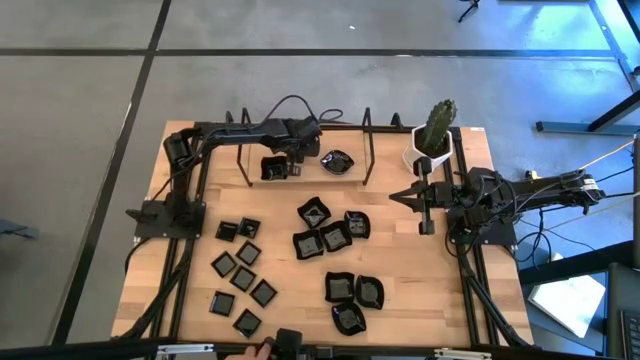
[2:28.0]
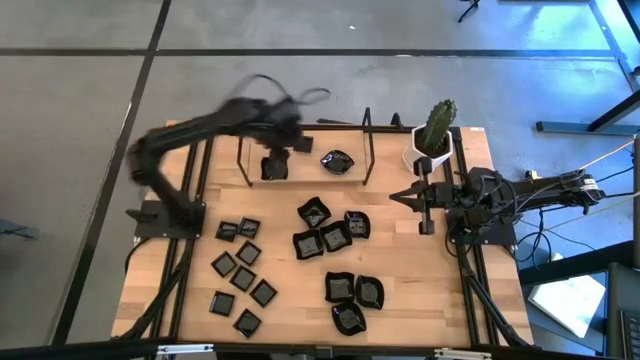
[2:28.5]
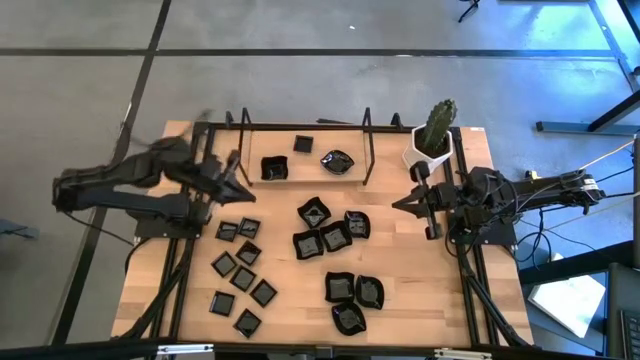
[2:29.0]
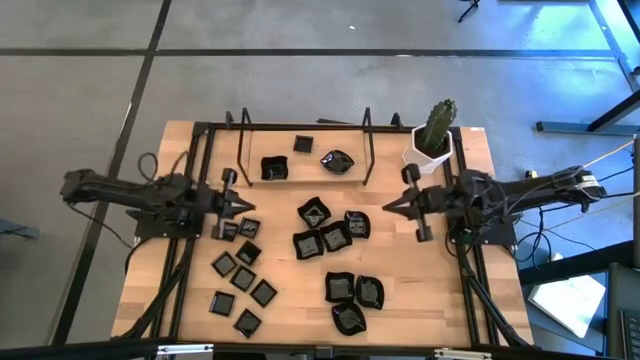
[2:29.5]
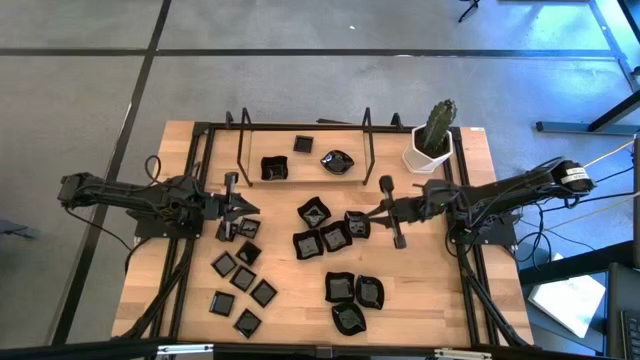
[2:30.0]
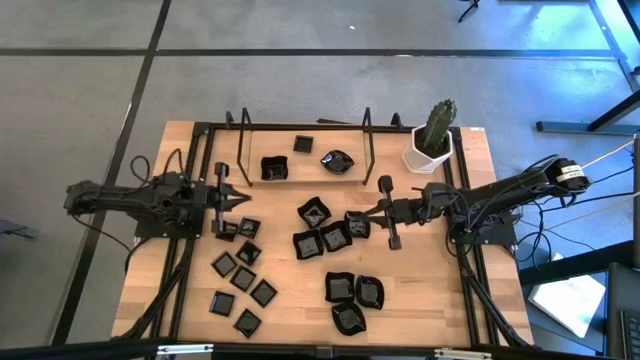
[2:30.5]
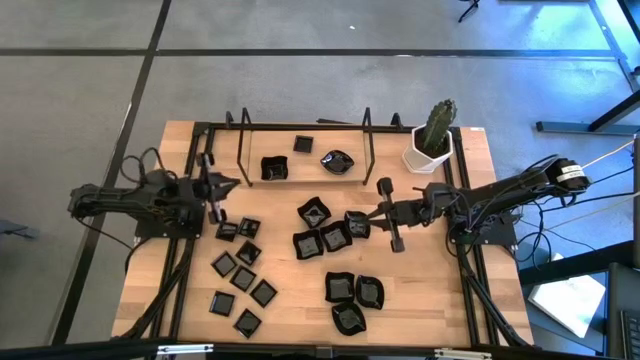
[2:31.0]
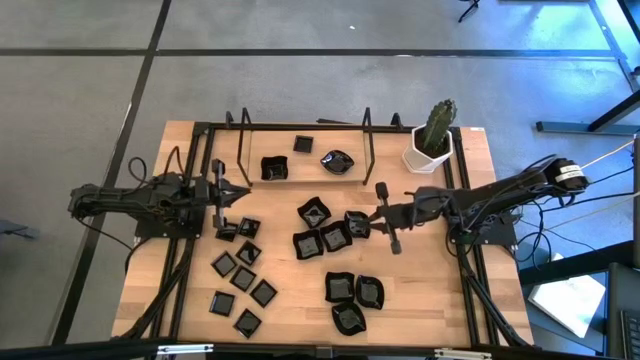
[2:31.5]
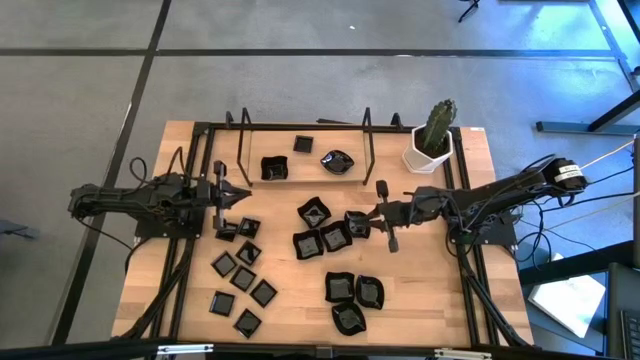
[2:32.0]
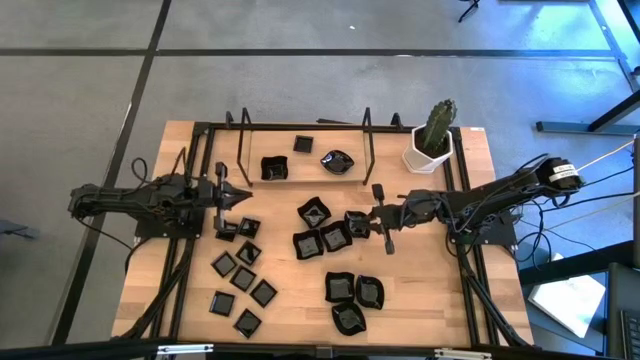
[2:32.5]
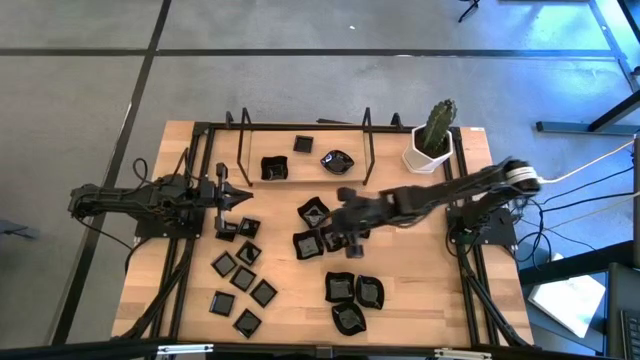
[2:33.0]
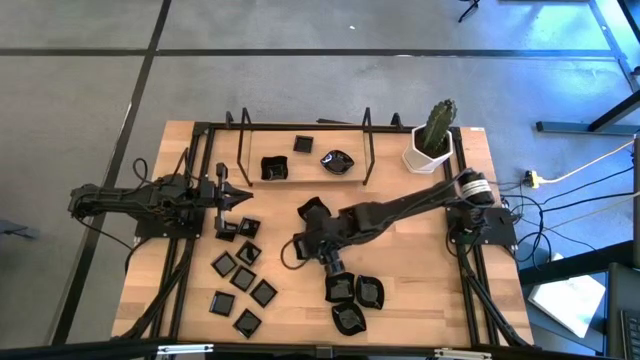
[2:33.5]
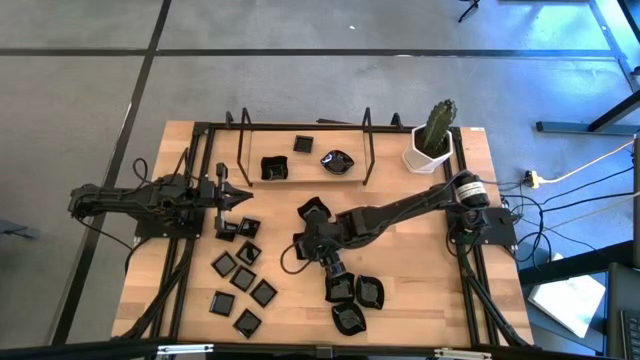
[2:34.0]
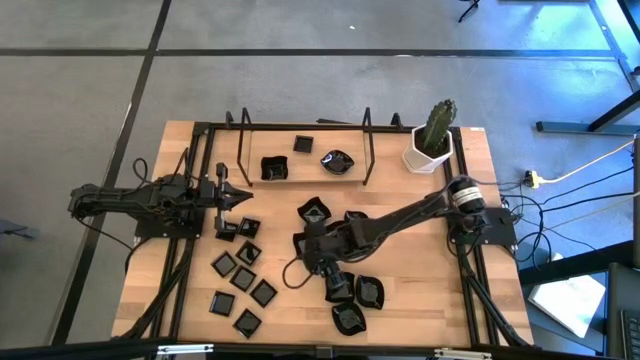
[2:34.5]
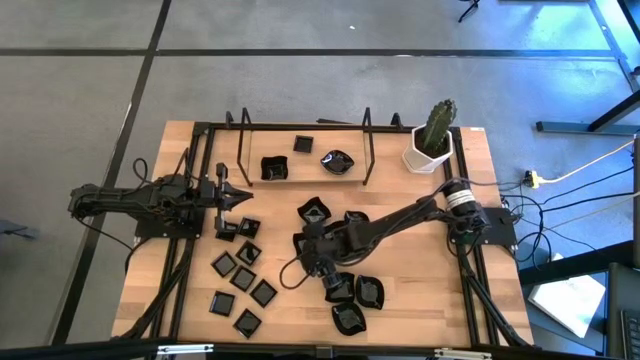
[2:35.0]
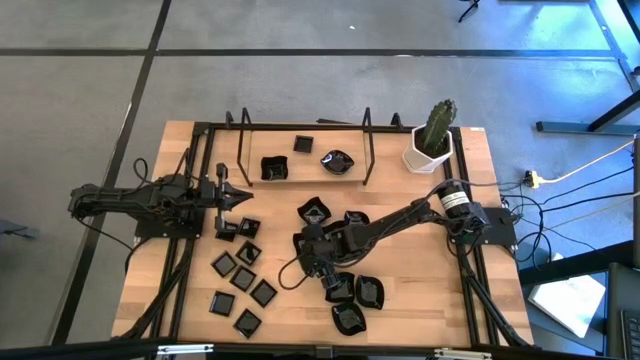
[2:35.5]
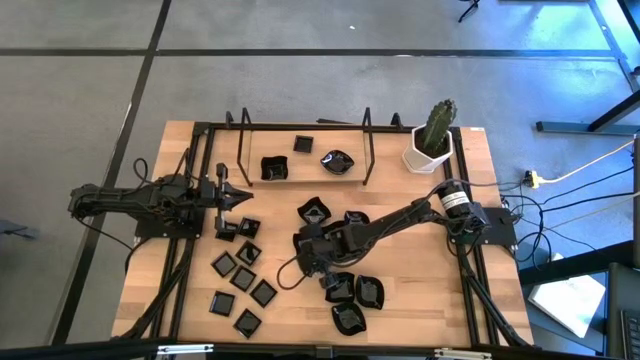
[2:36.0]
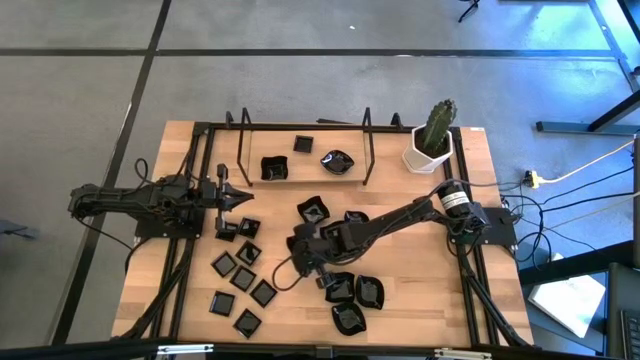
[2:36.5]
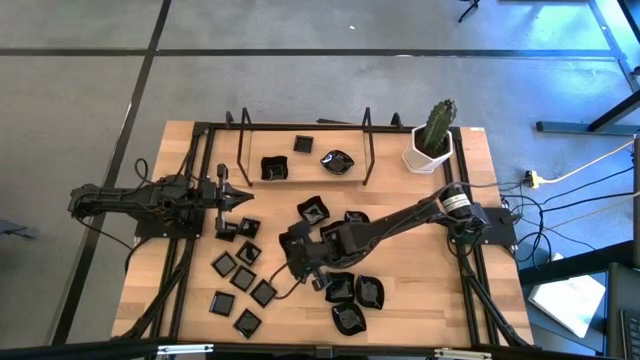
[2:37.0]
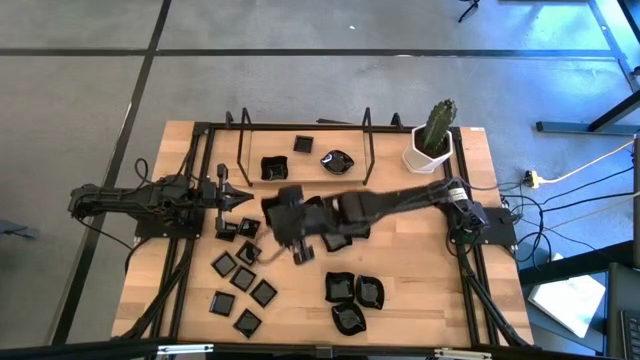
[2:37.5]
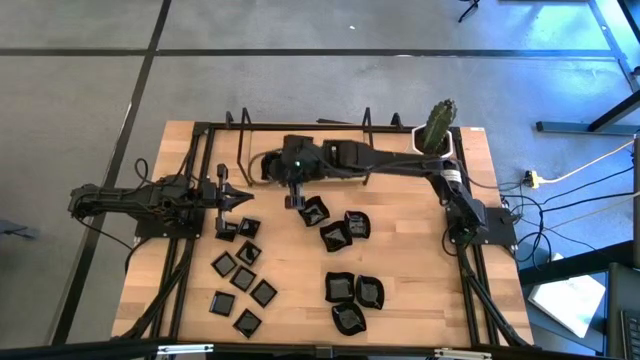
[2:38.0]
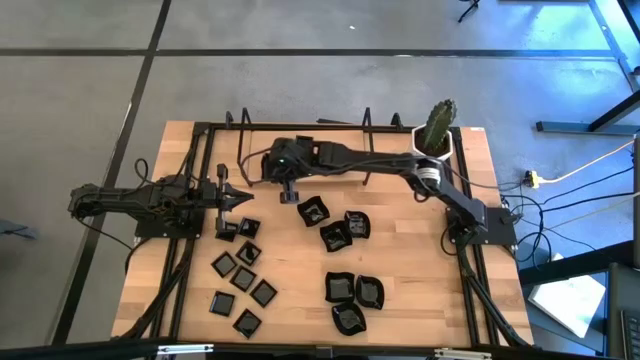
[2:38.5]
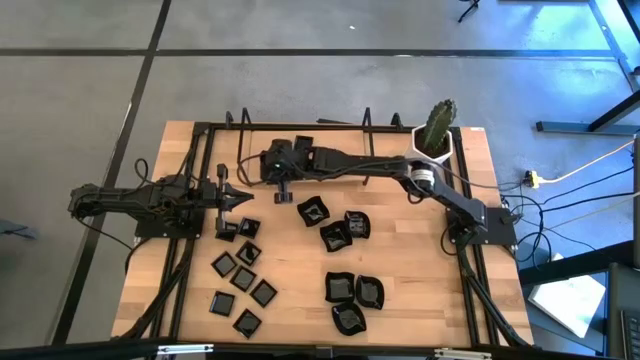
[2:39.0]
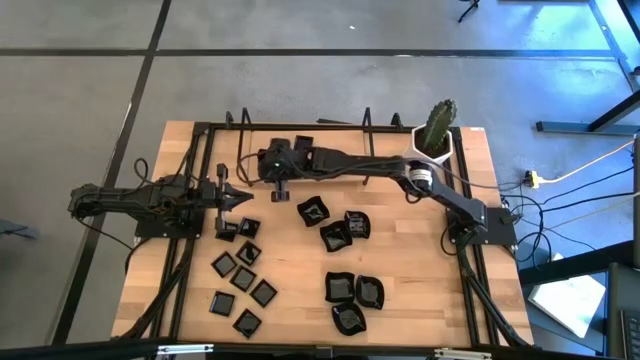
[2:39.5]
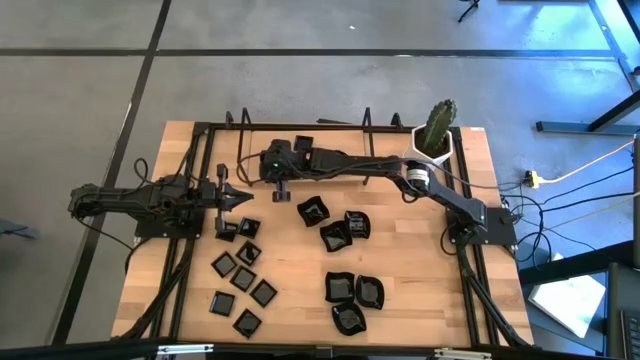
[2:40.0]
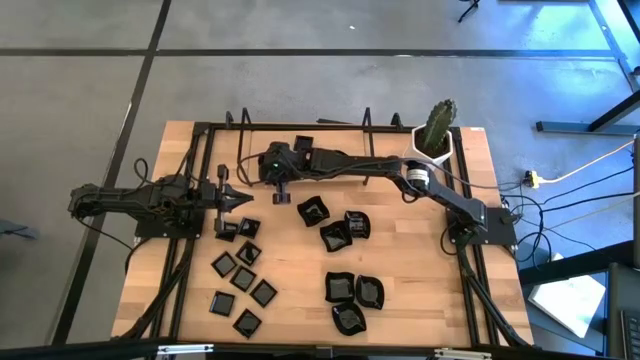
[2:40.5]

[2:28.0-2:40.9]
Task: Pick & Place Mini shaped plates
Stack the distorted square plate on top of the distorted square plate on the shelf

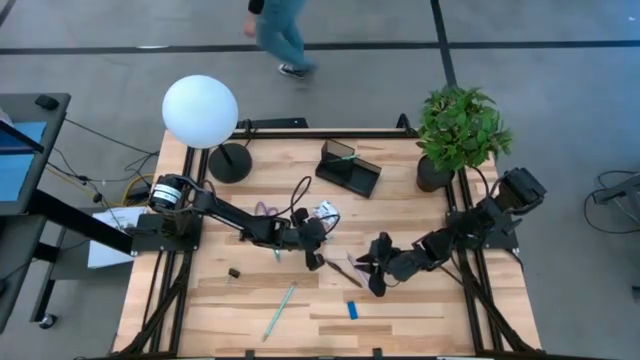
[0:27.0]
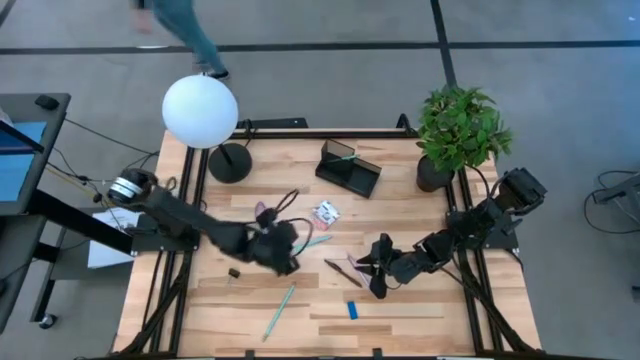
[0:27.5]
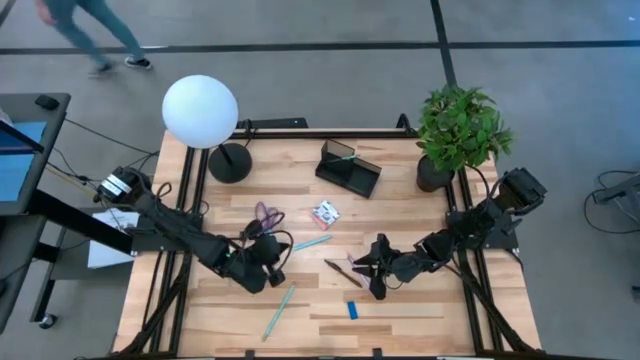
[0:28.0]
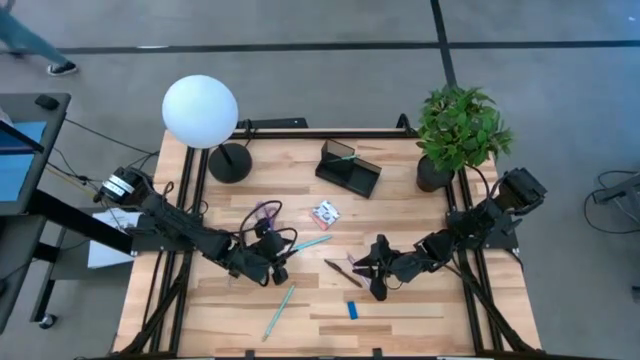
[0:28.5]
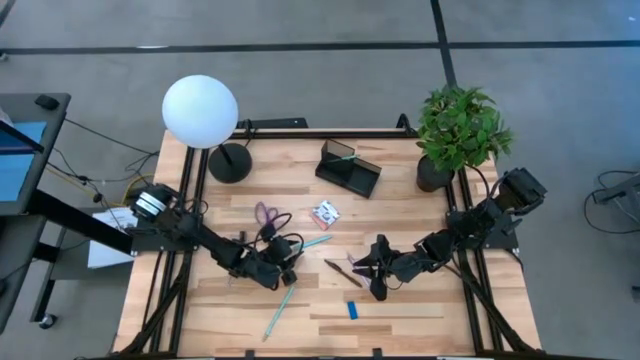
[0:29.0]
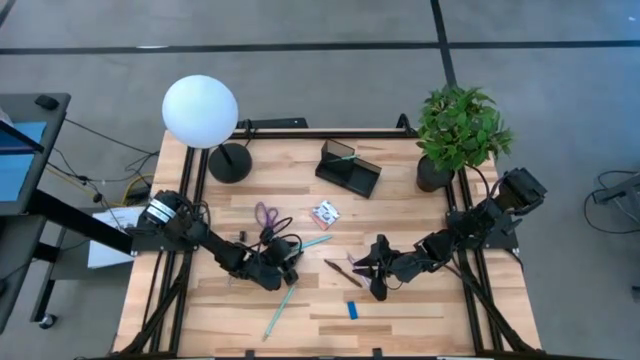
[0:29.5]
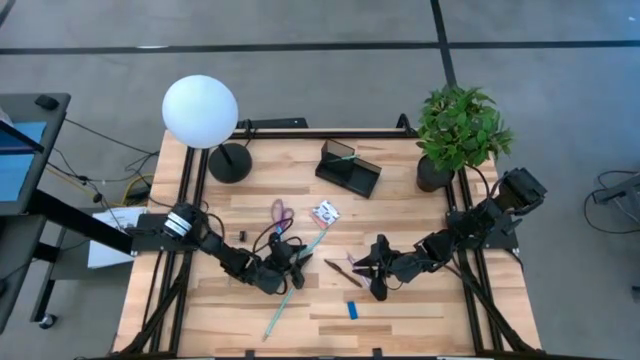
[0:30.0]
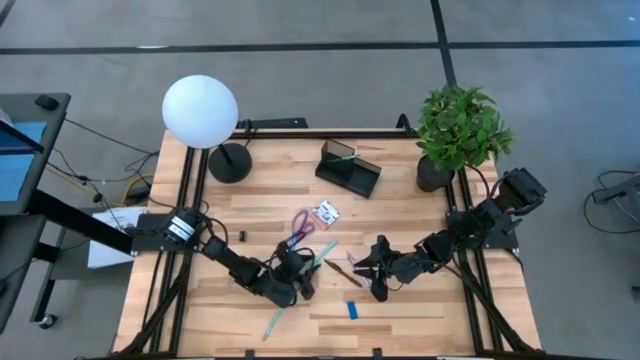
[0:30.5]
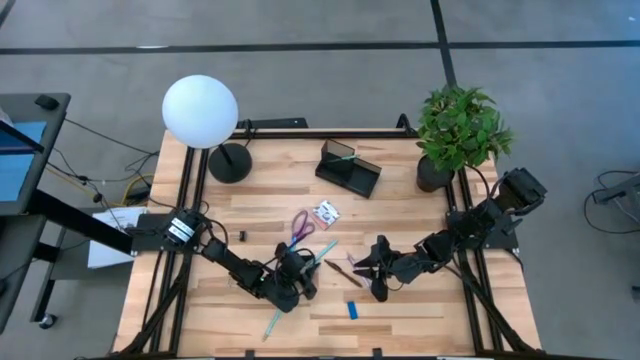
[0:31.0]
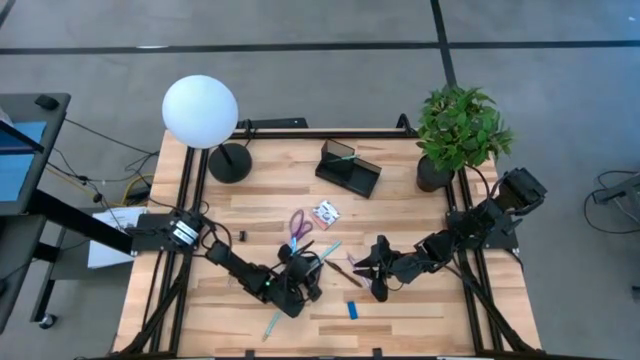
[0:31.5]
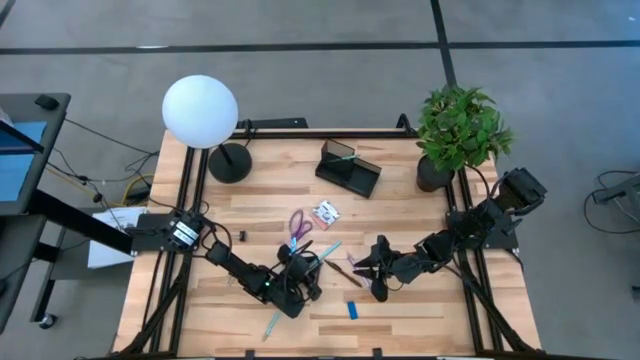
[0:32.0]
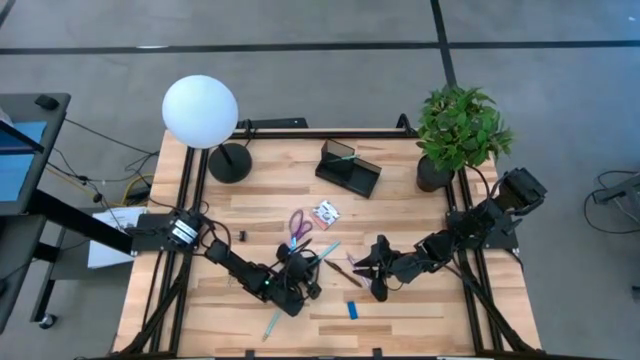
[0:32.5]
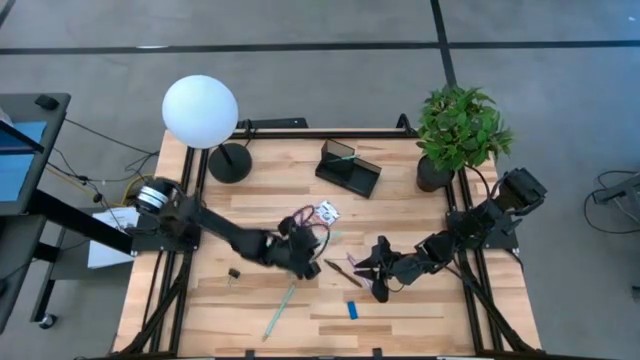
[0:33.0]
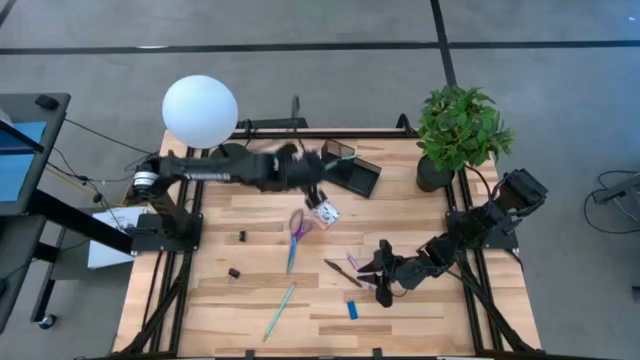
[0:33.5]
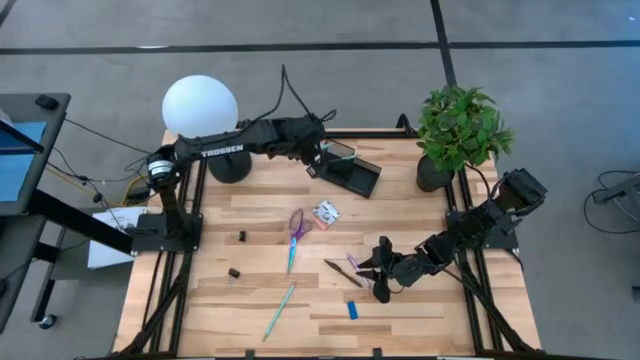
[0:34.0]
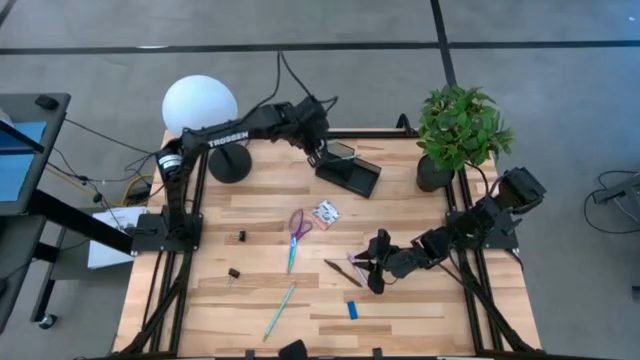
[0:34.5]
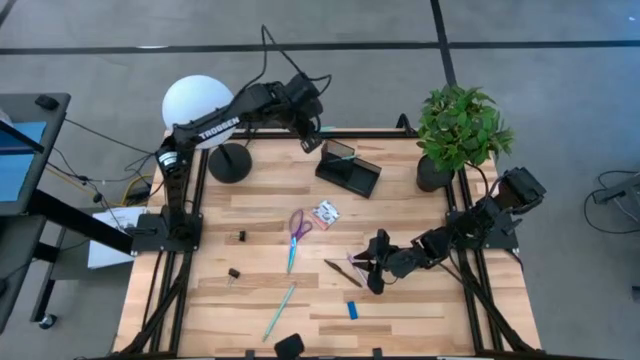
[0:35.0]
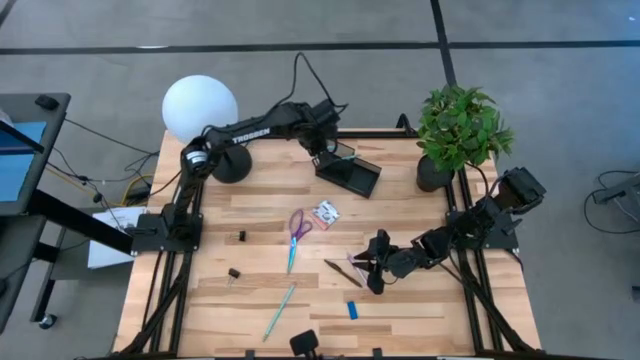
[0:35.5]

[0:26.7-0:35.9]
Task: Pick and place office supplies into organizer
Put the light blue pen into the black desk organizer
